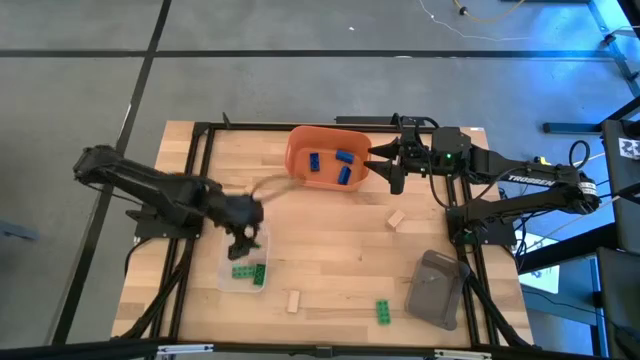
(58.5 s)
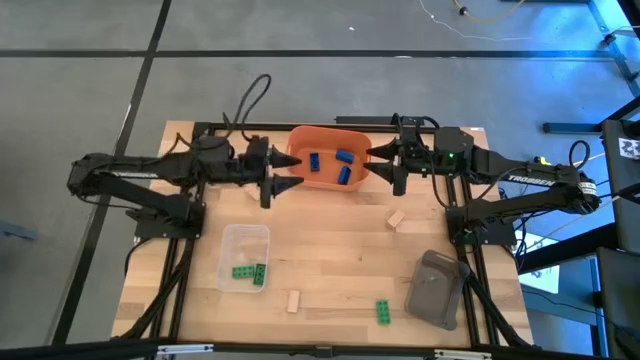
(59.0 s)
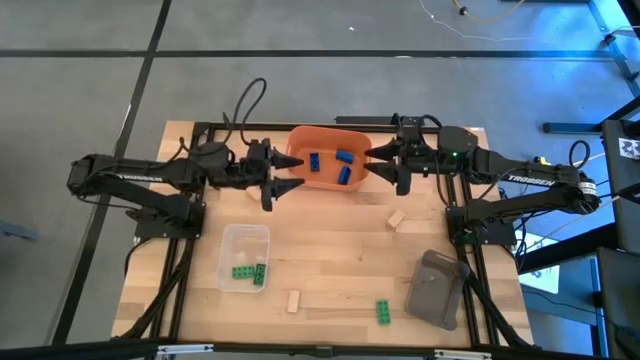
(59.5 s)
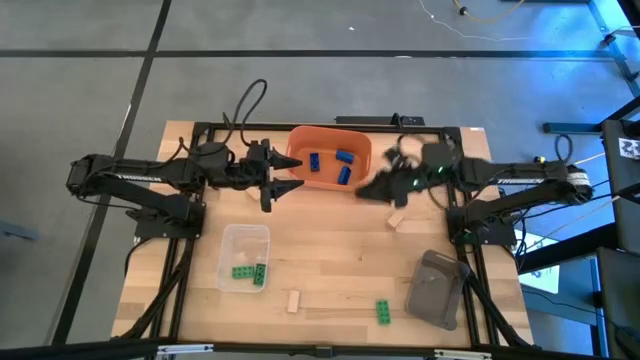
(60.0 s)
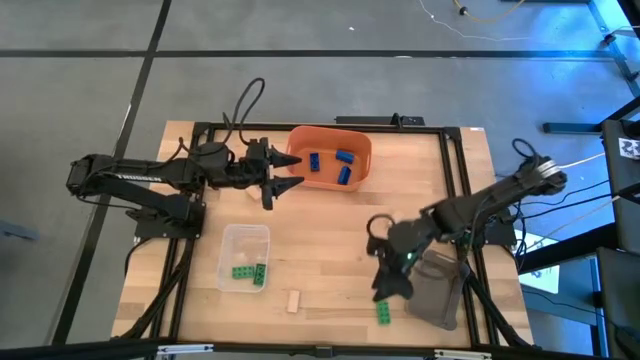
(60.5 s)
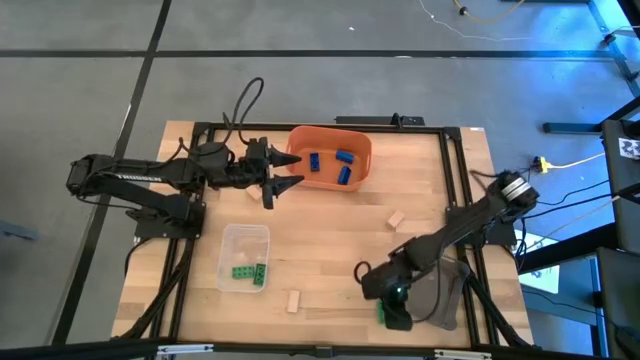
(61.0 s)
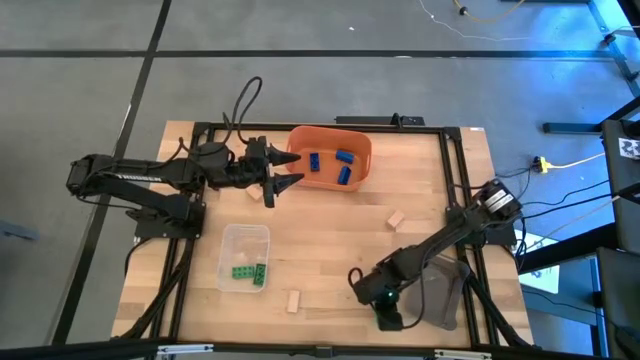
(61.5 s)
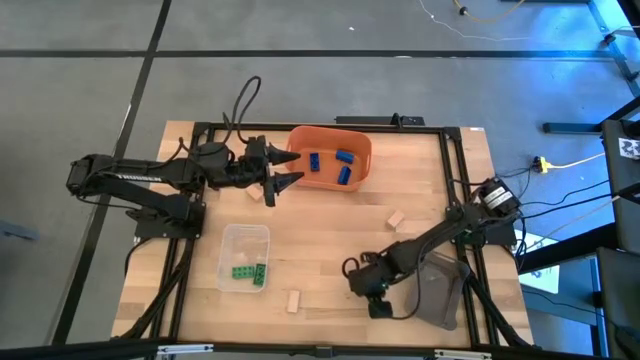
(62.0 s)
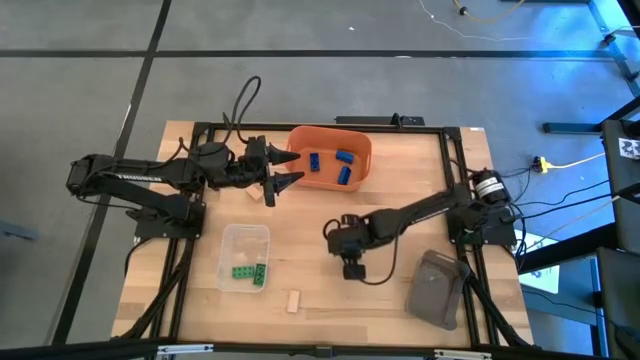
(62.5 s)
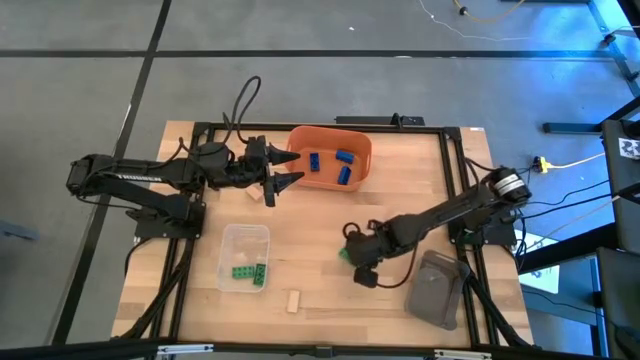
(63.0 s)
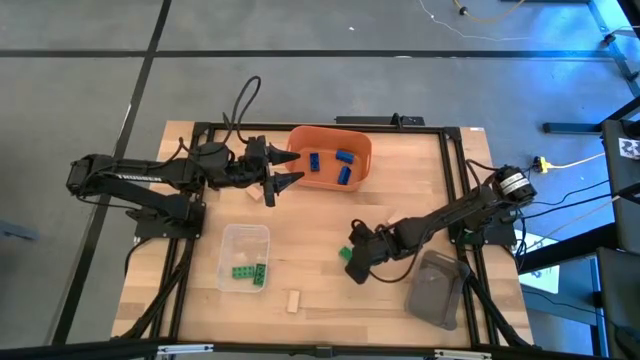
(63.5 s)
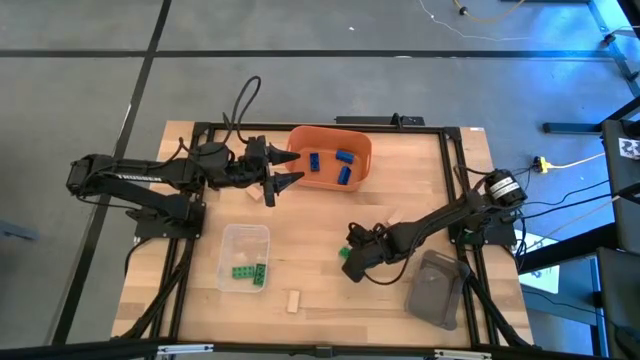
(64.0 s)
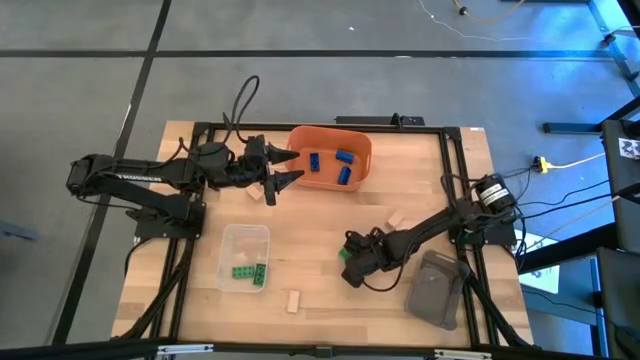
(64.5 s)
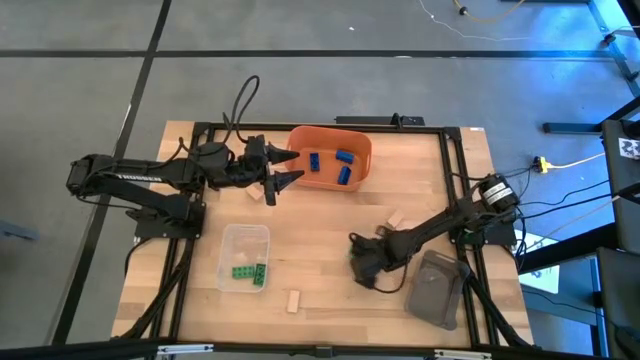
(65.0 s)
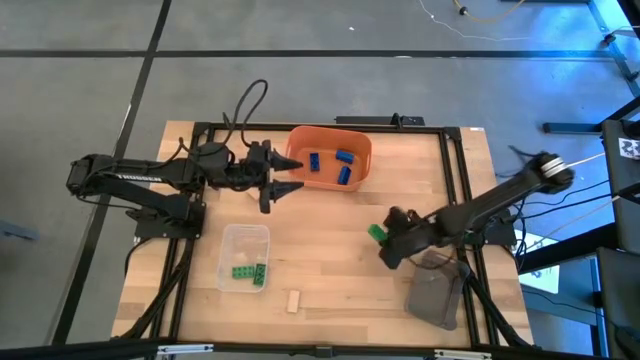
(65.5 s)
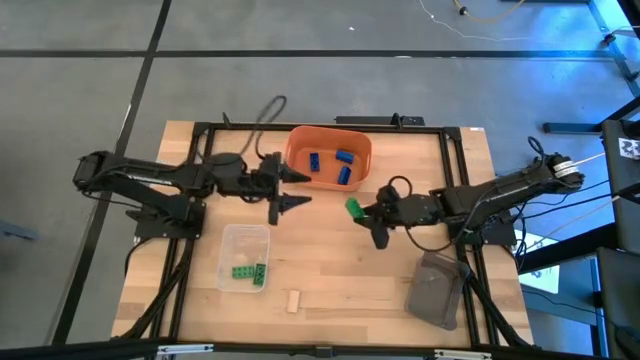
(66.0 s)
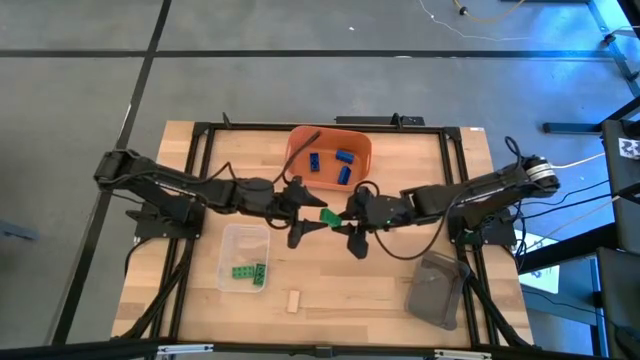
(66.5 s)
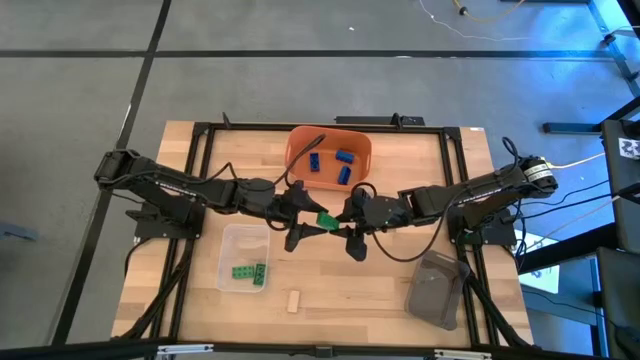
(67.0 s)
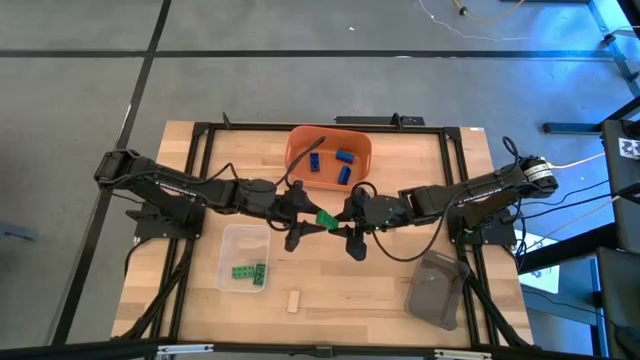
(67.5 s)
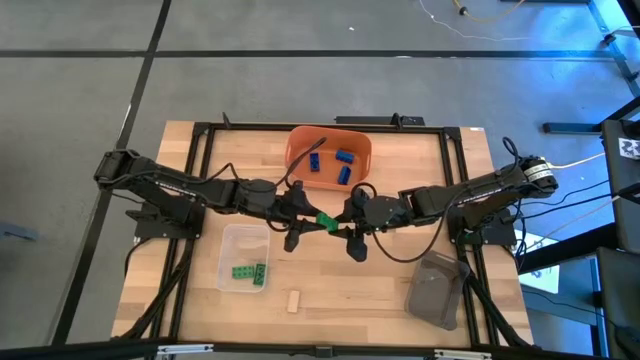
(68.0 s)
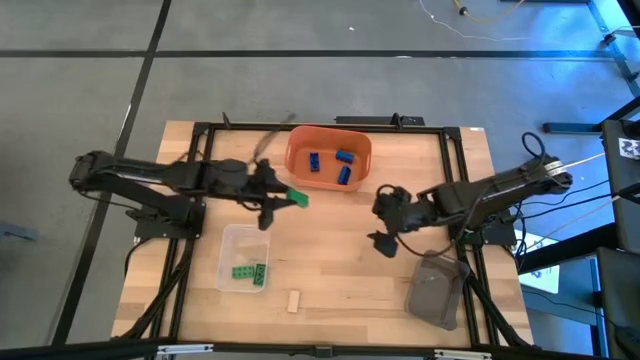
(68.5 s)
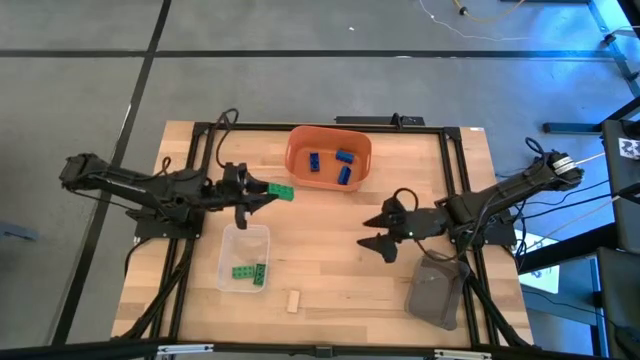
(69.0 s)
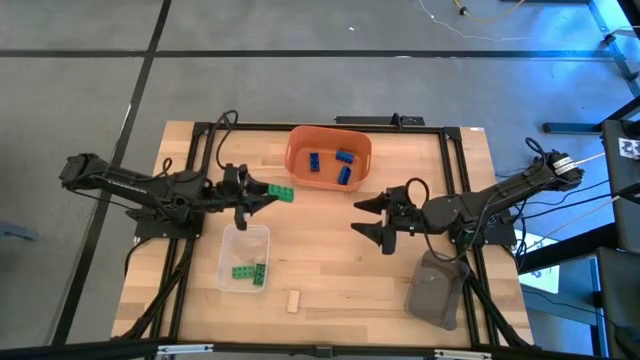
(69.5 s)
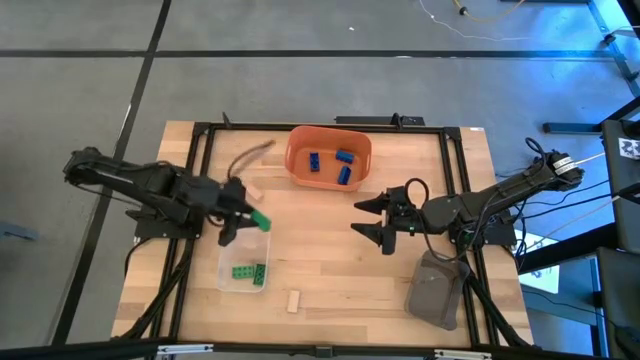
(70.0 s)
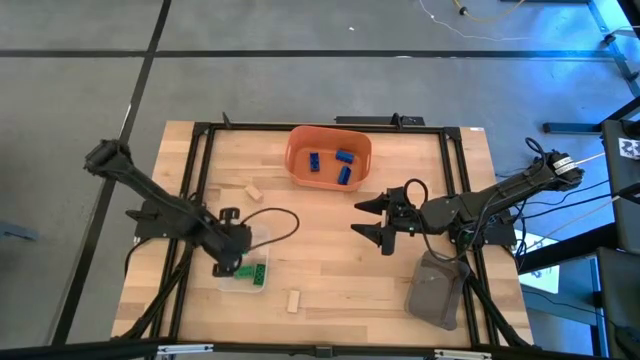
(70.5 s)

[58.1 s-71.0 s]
Task: Sort & place blocks by color
Put the green game piece into the transparent bin

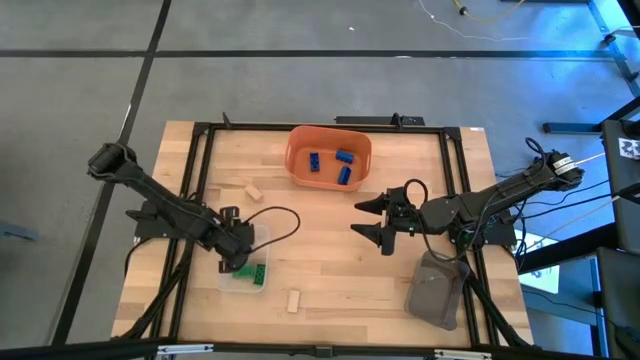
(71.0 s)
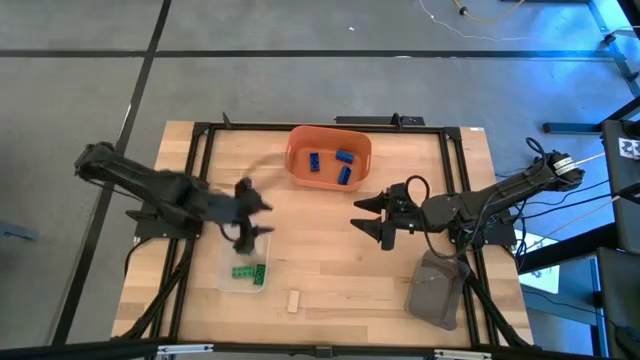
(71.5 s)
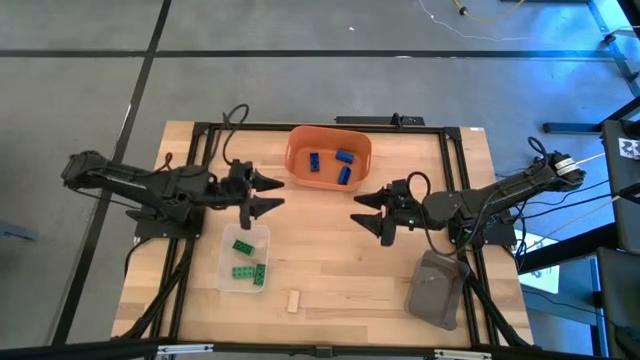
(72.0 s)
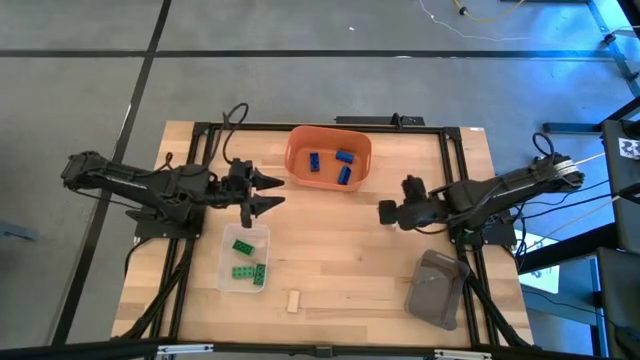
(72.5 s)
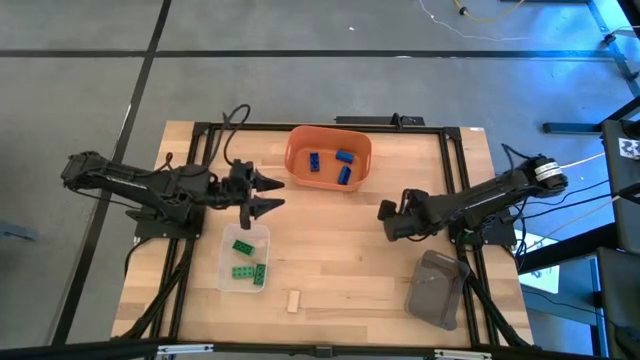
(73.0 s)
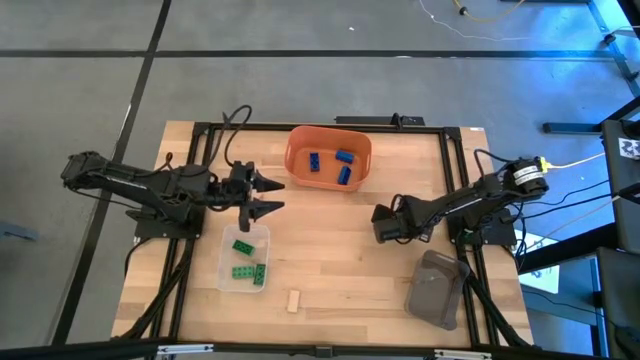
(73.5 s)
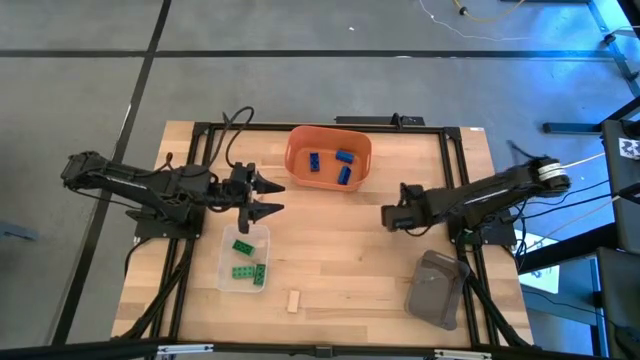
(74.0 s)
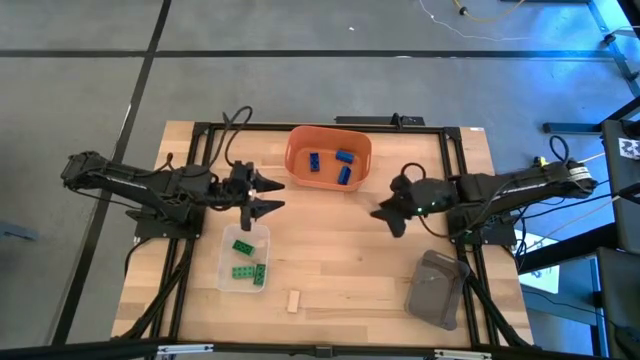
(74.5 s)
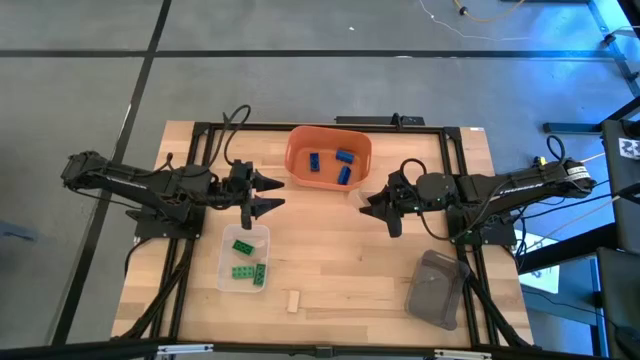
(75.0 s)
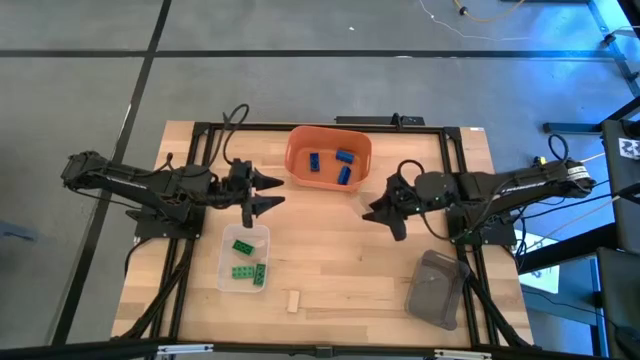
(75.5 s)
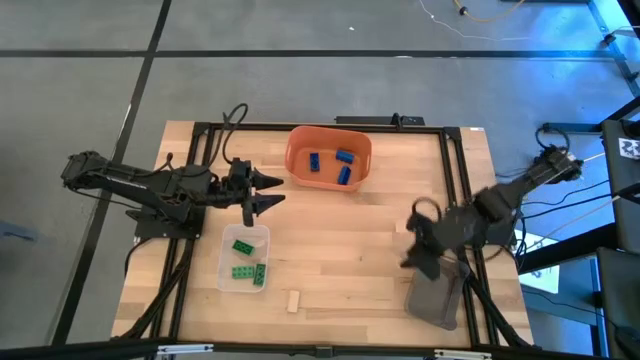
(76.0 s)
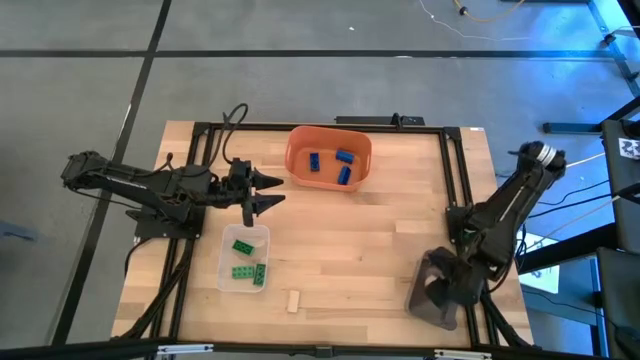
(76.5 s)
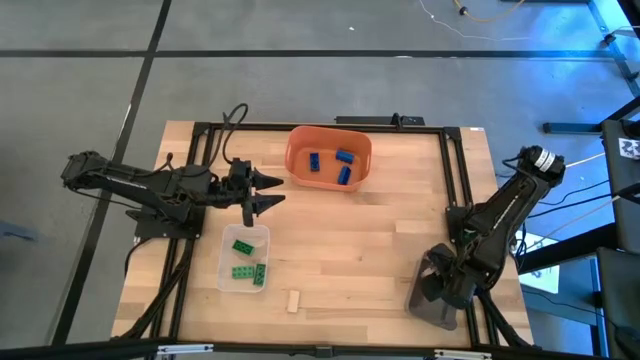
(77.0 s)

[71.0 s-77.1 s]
Put the top right brown block into the black bin

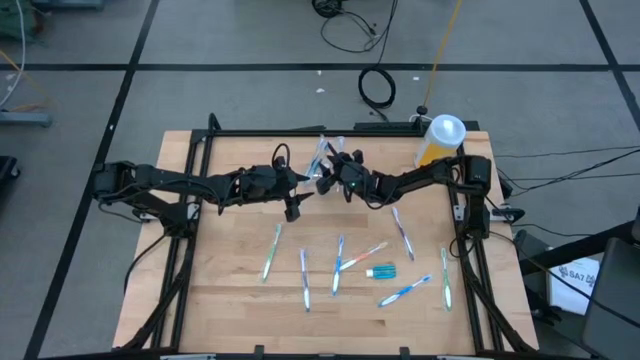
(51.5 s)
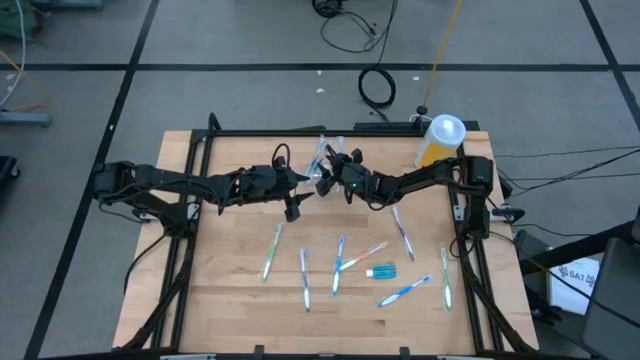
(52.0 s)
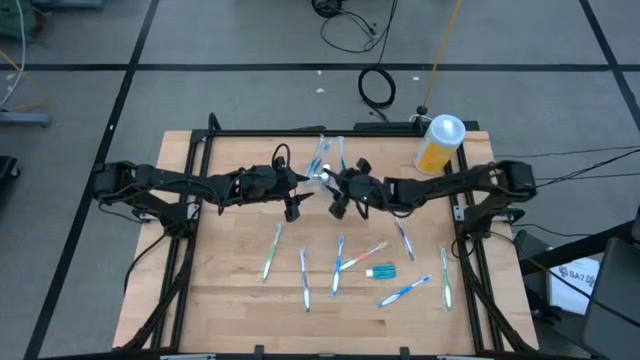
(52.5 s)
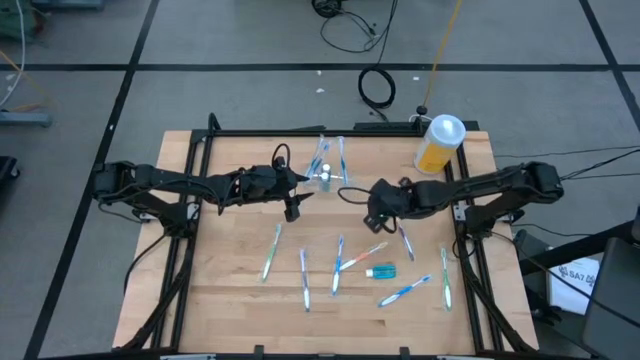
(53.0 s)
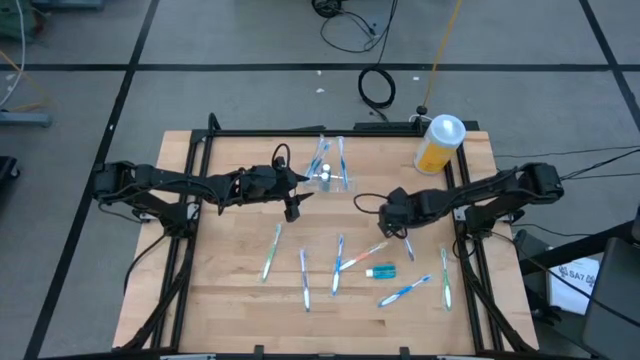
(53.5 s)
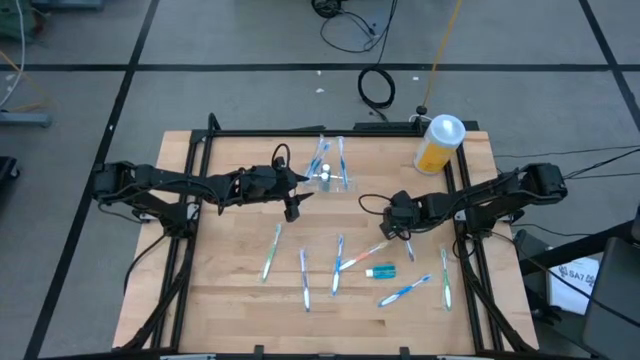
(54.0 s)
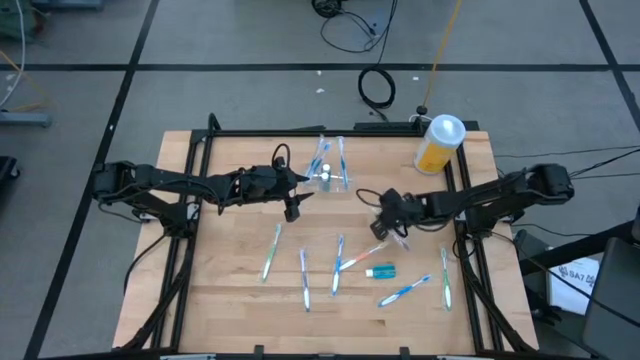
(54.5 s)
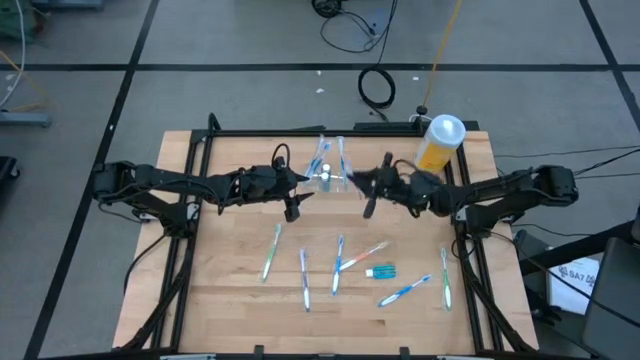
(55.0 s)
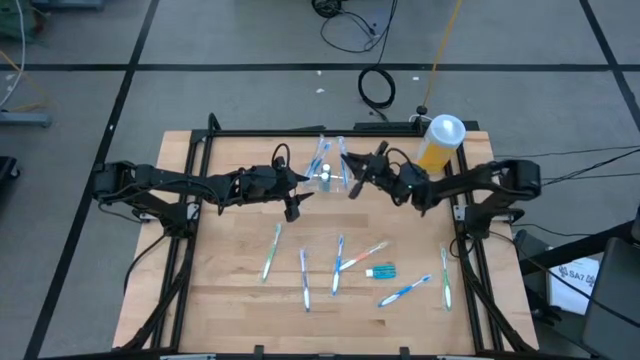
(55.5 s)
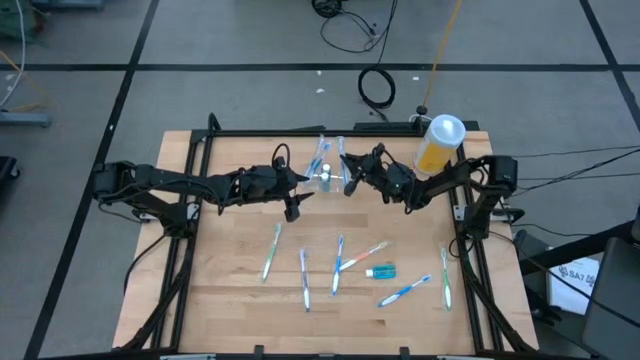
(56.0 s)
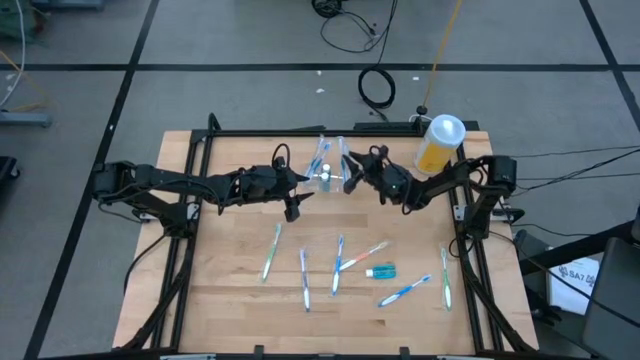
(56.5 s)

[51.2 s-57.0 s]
Task: Pick & Place toothbrushing station
Put the purple toothbrush into the transparent organizer
